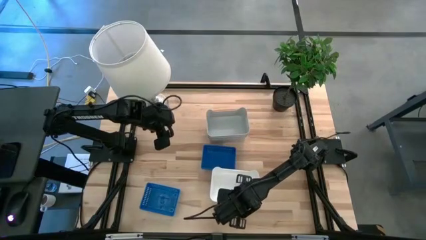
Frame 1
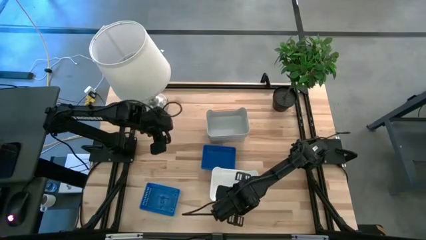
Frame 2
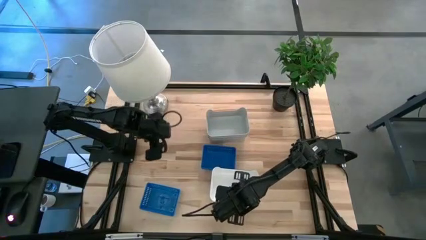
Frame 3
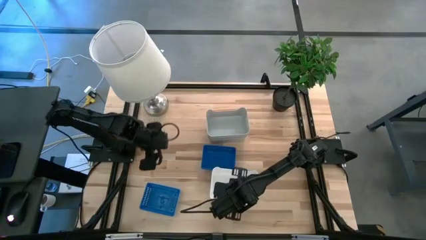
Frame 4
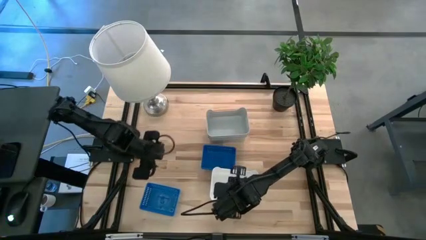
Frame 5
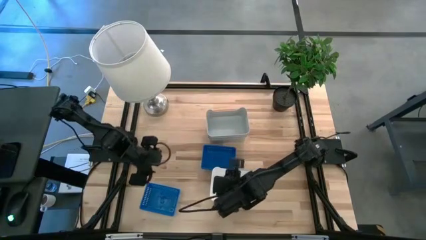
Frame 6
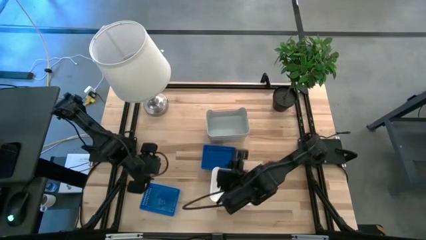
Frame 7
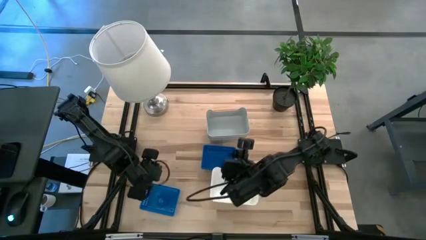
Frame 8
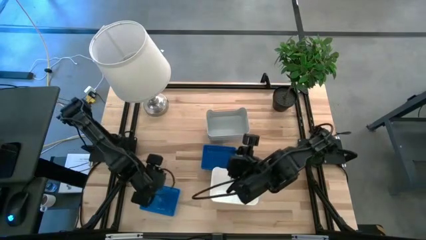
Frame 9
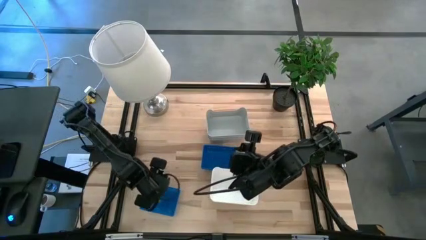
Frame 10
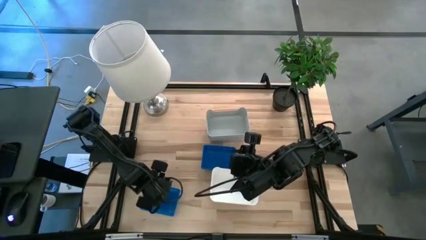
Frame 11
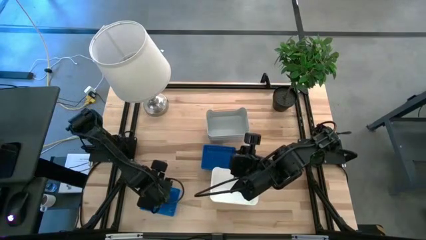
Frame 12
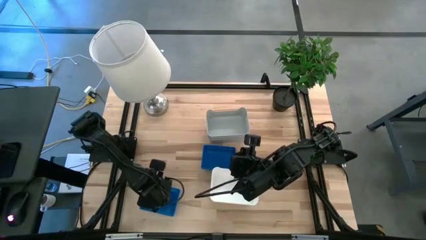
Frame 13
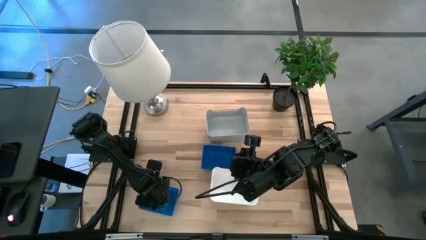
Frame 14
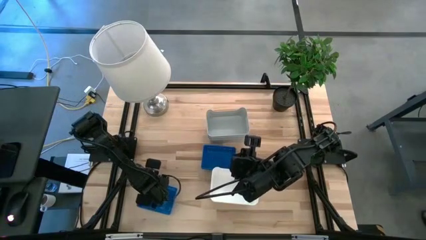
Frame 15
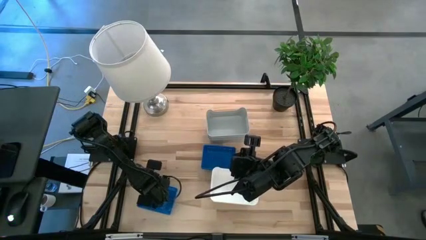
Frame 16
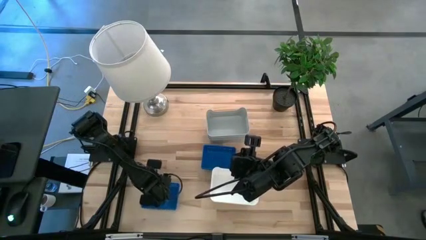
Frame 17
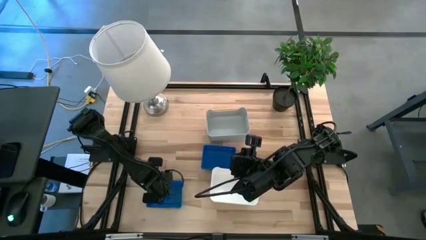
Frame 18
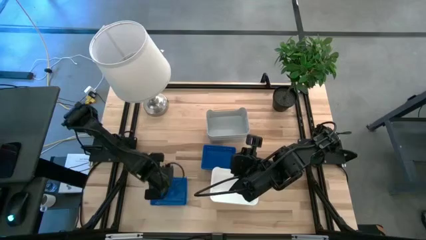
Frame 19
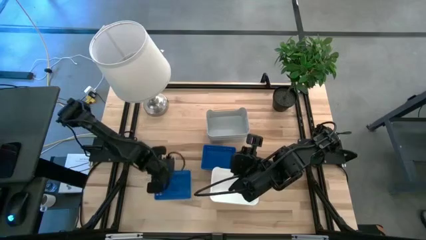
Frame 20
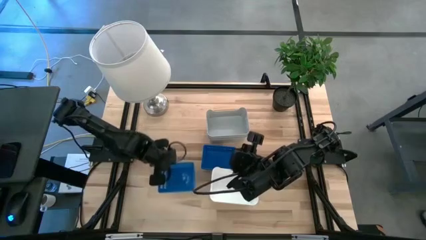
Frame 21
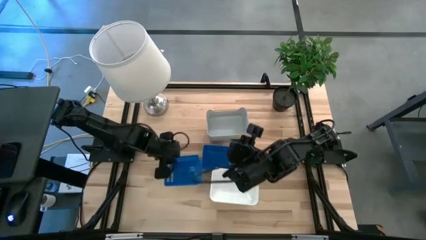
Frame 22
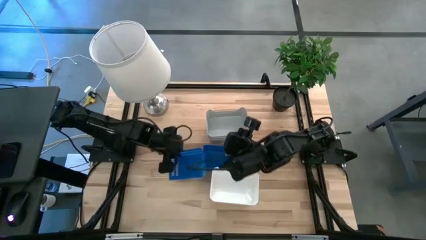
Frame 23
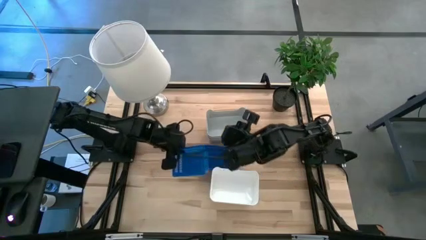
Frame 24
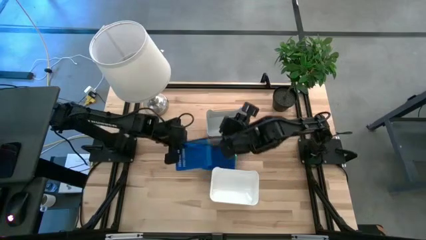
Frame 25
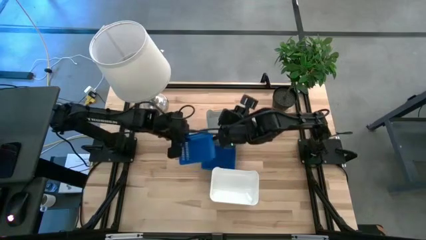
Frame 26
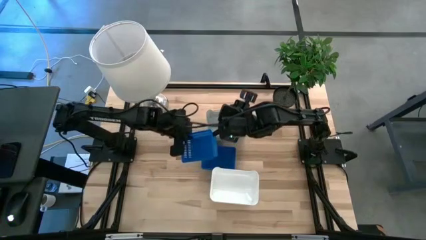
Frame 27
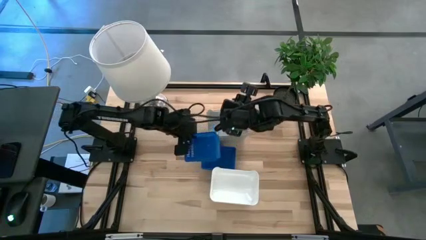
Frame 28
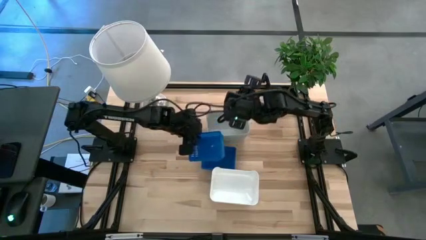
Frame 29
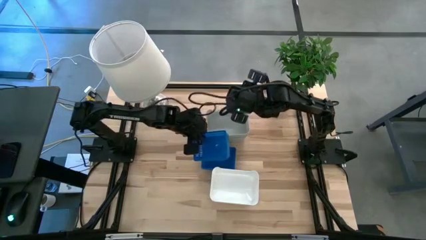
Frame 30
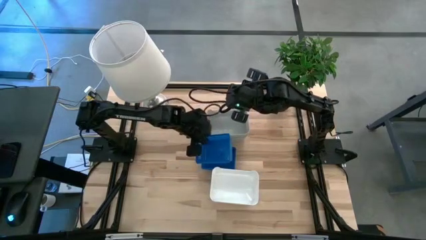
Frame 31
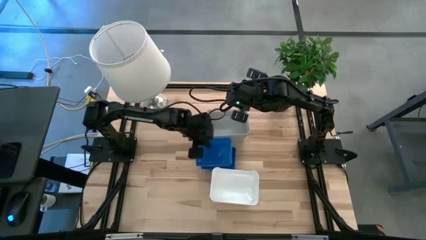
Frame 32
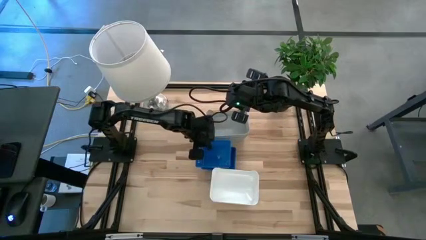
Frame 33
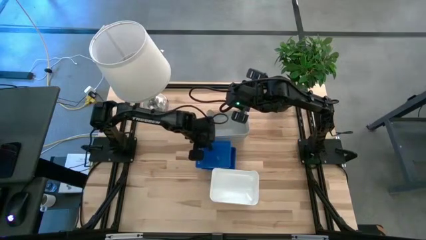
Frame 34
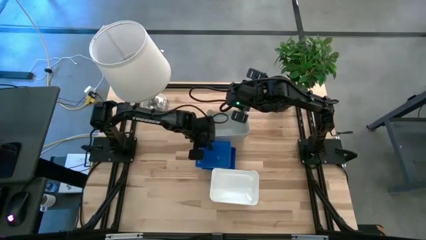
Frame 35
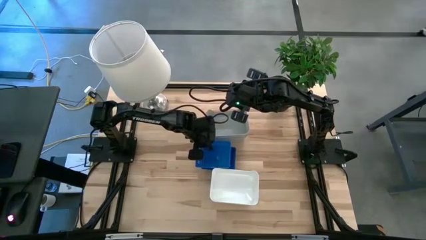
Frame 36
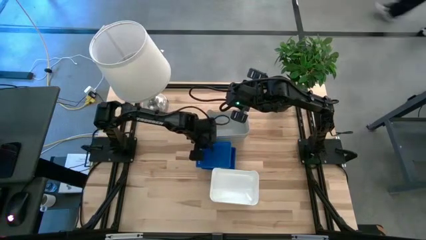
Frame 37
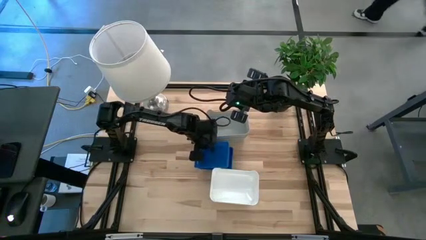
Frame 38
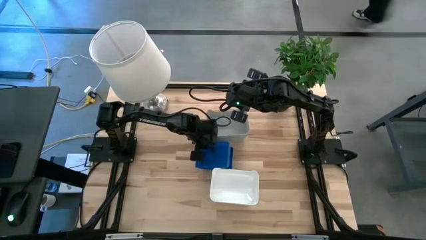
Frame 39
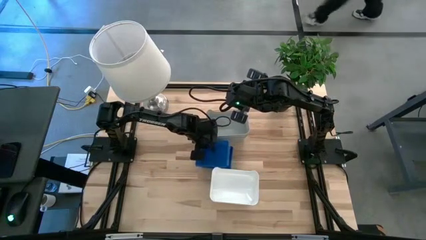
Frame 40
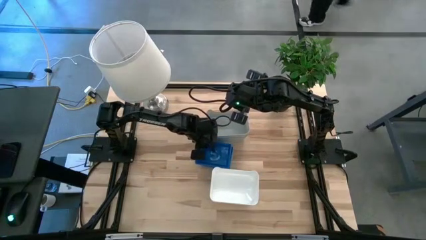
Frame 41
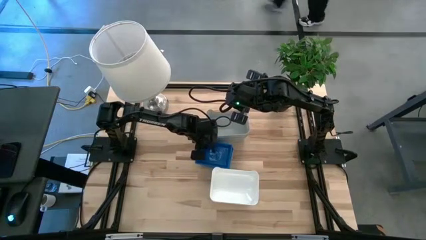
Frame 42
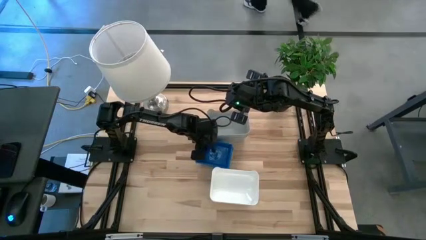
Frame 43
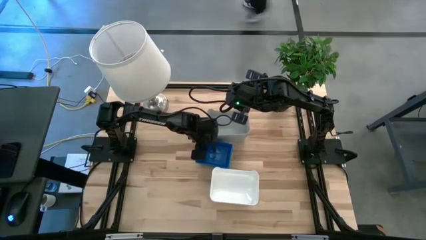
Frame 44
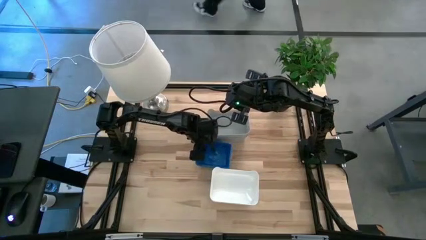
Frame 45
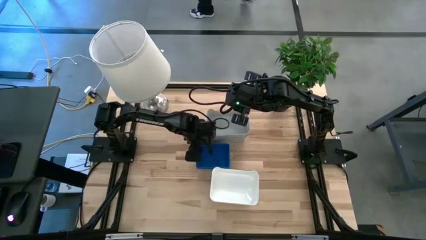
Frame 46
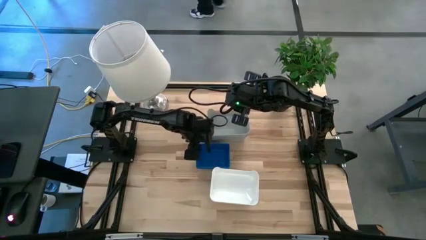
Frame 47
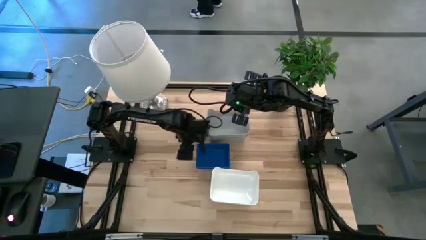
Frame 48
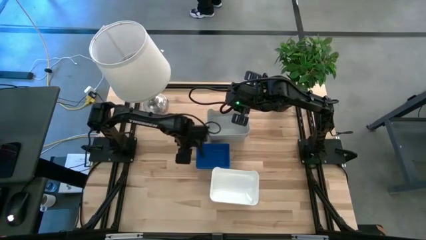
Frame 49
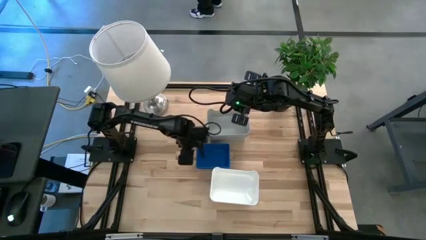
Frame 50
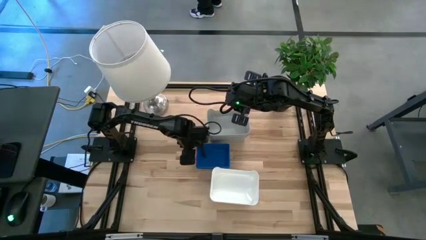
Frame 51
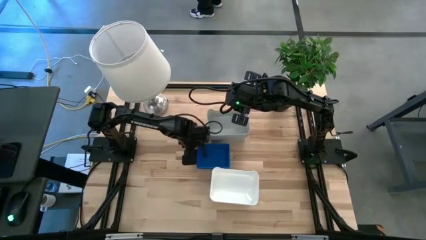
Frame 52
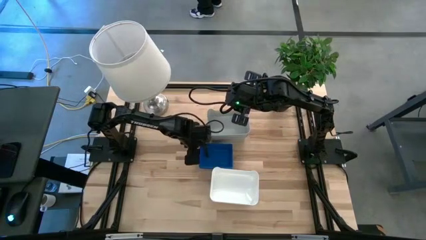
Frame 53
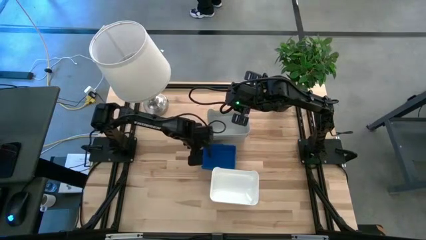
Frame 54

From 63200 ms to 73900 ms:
Stack the bottom blue bin on the top stacked blue bin

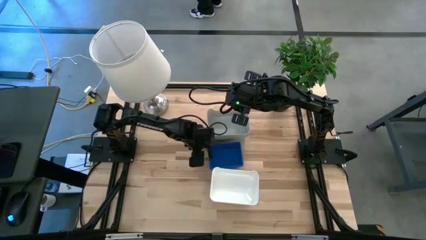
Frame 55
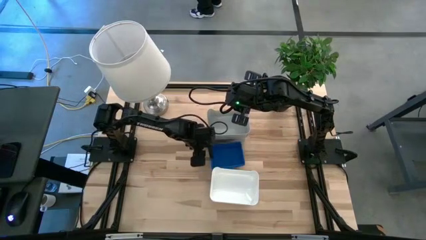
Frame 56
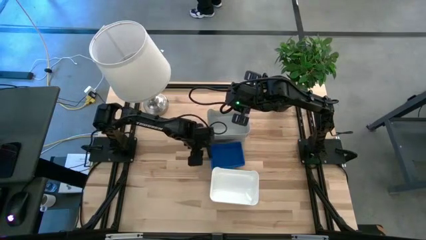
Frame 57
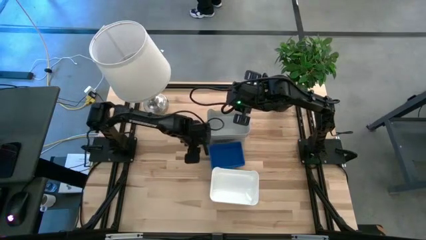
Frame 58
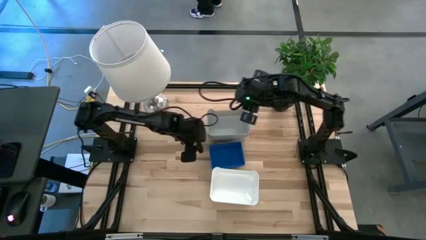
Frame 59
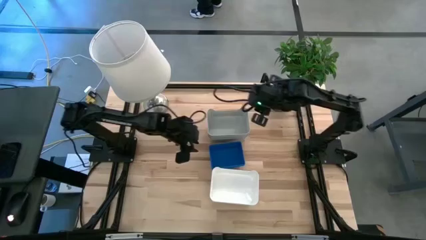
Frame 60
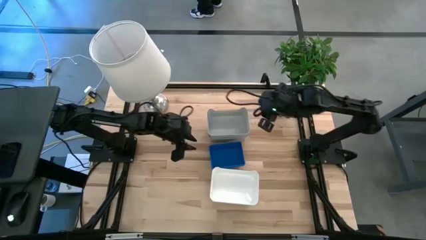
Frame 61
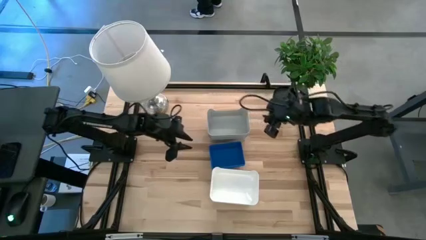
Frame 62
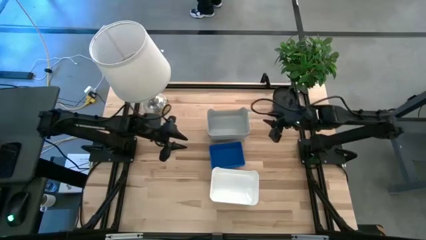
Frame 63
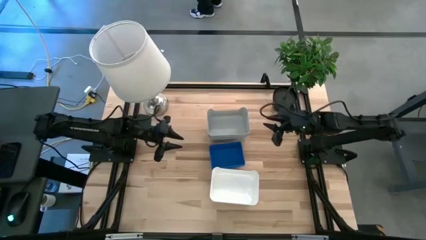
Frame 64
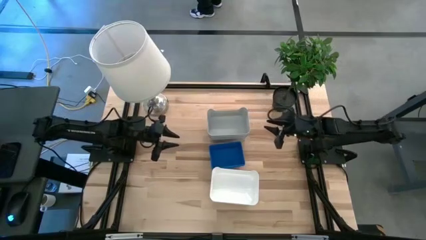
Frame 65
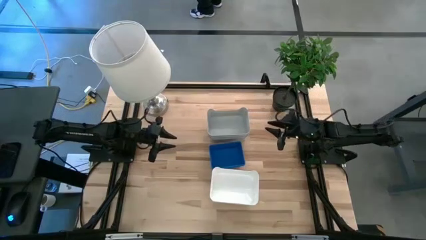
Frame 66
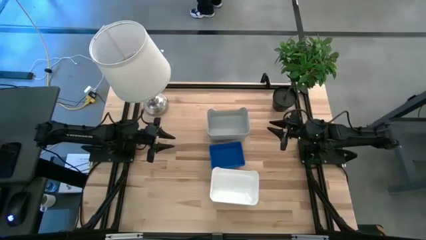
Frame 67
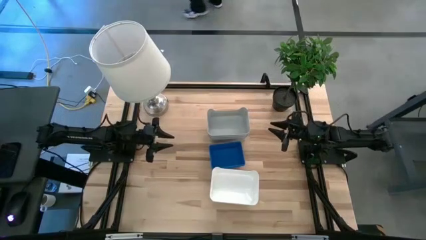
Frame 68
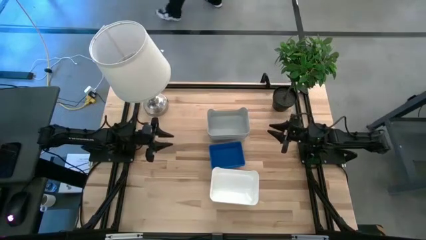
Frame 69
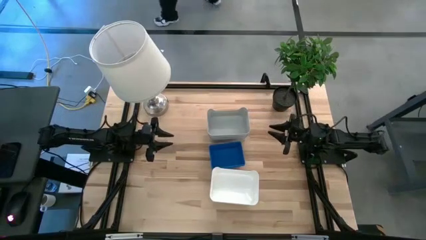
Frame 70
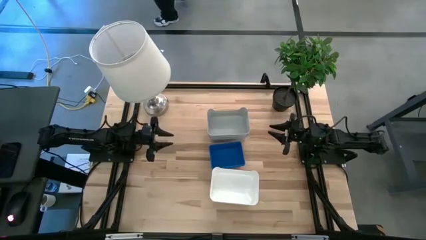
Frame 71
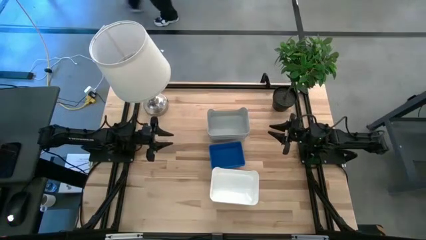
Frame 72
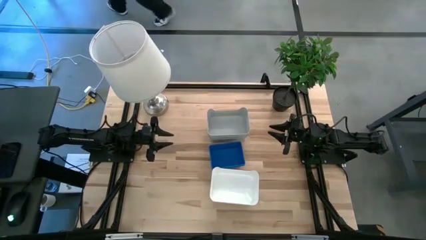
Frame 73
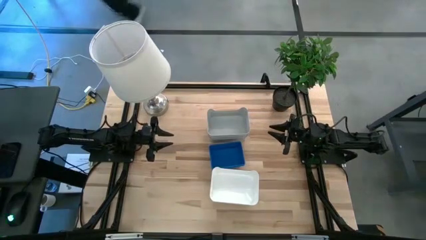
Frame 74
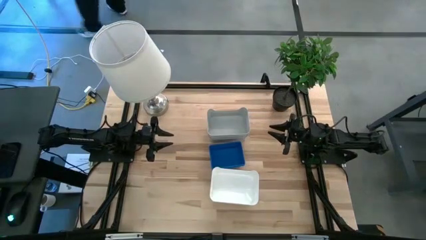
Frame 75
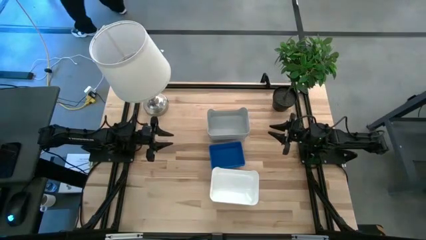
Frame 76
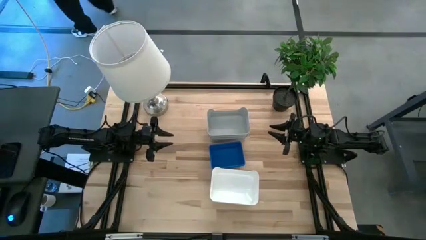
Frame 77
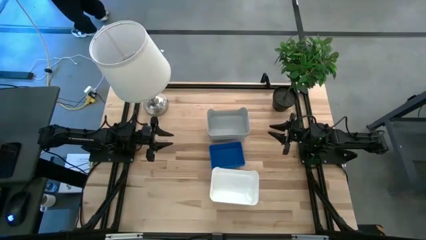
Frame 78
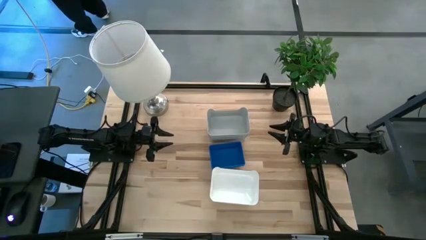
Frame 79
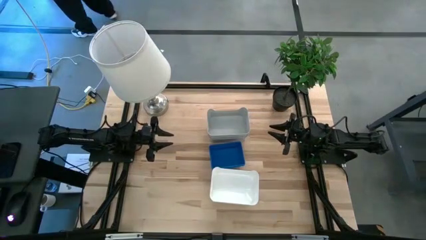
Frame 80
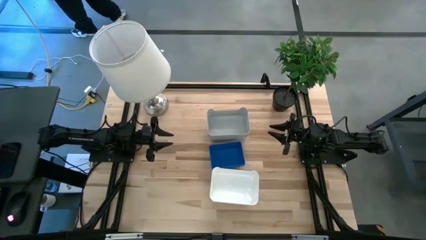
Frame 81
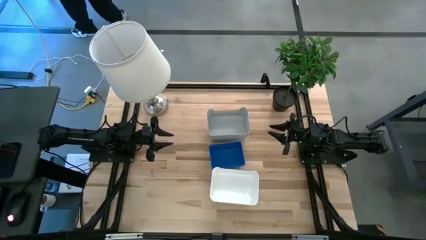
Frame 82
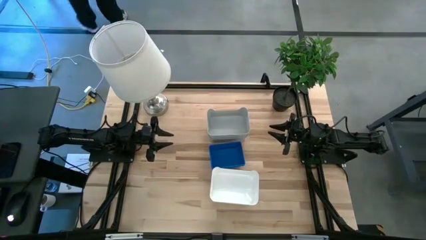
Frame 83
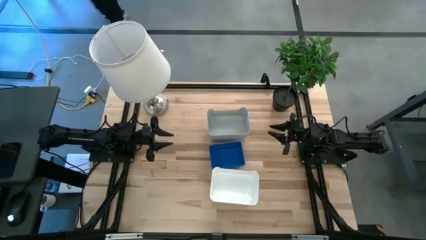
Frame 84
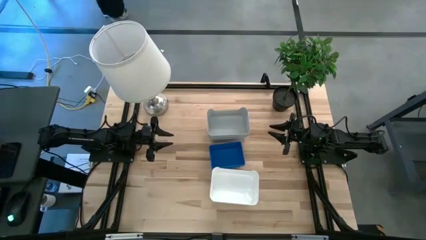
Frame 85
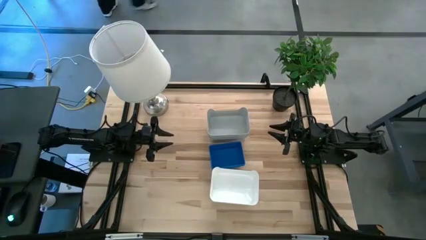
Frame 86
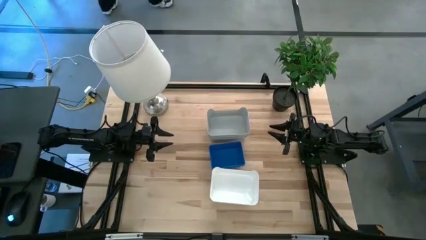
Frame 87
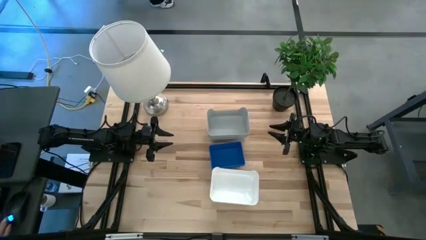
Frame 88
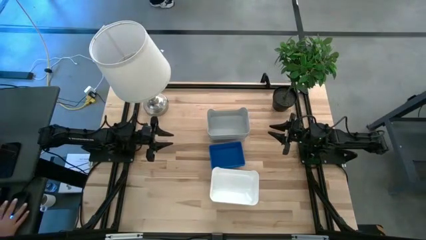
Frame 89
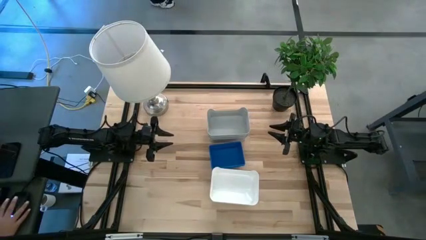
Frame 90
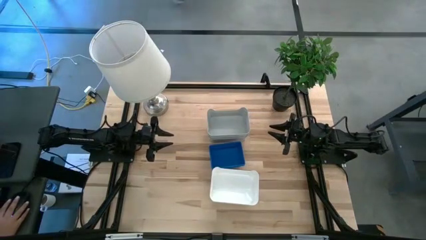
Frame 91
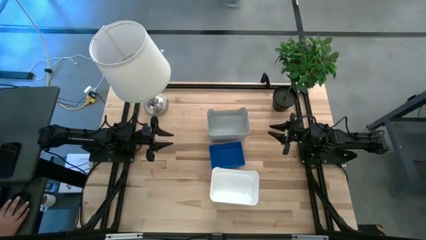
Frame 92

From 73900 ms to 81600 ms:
Return to Home Position
